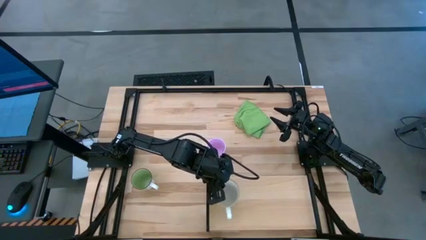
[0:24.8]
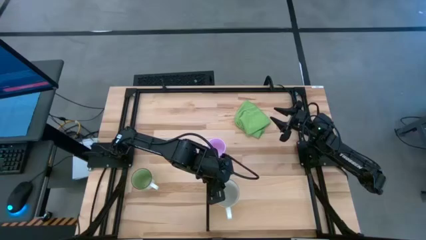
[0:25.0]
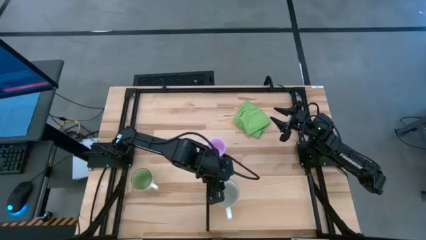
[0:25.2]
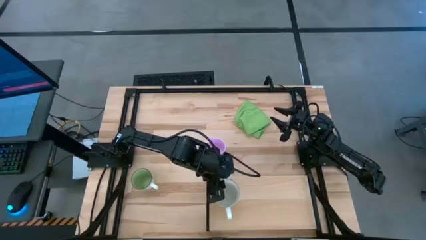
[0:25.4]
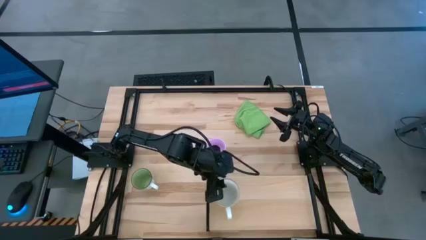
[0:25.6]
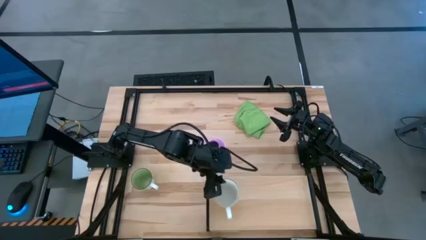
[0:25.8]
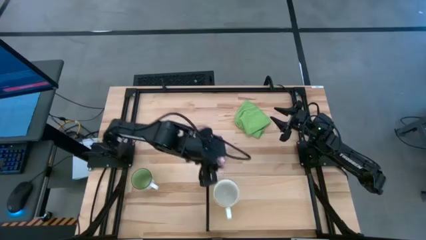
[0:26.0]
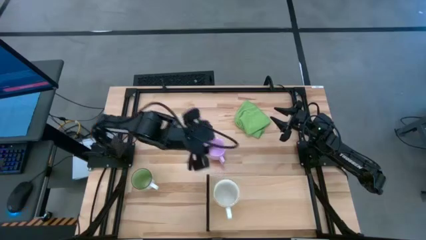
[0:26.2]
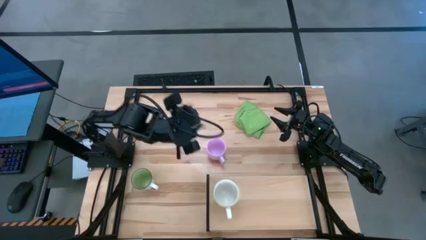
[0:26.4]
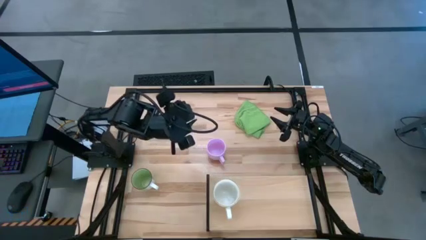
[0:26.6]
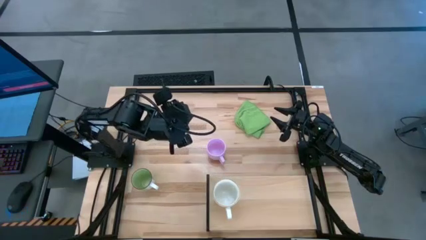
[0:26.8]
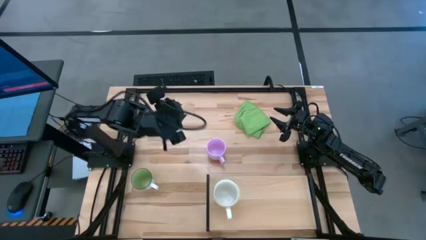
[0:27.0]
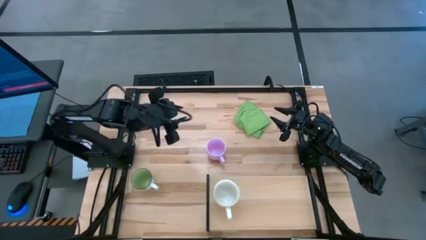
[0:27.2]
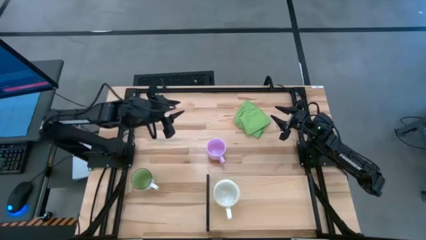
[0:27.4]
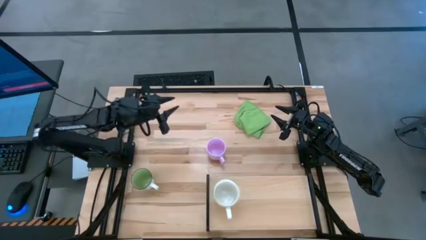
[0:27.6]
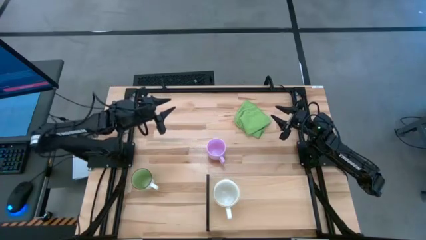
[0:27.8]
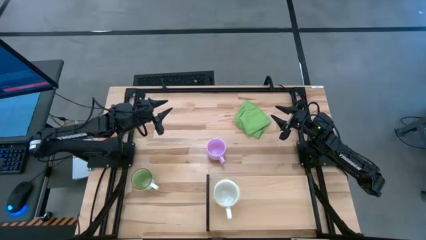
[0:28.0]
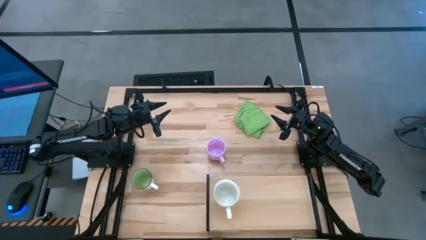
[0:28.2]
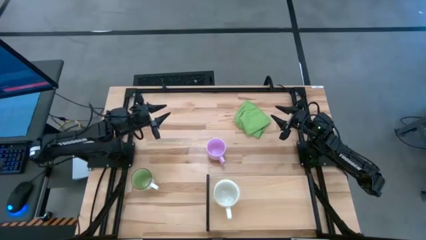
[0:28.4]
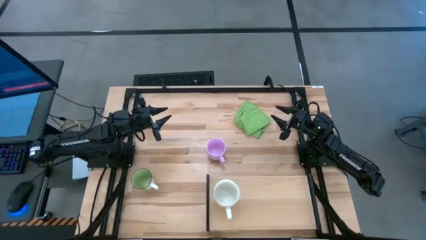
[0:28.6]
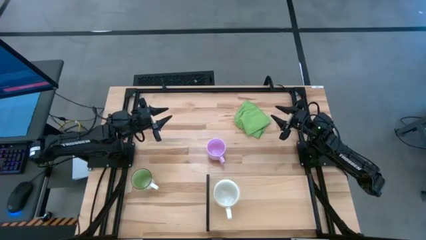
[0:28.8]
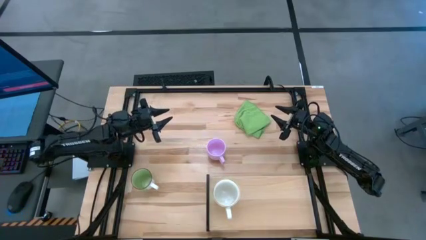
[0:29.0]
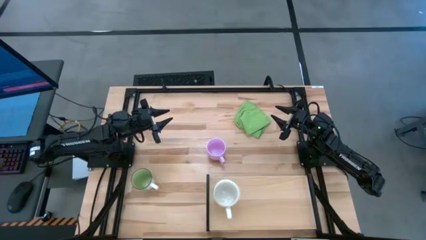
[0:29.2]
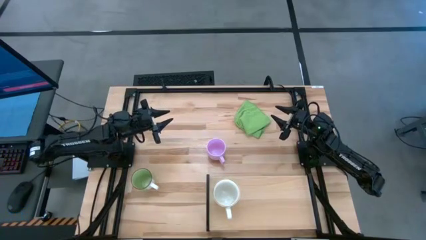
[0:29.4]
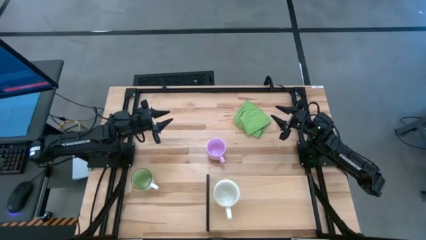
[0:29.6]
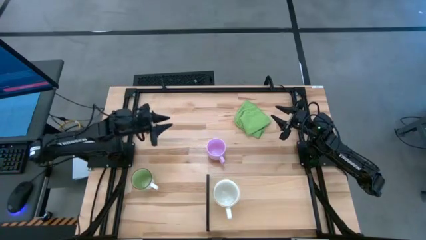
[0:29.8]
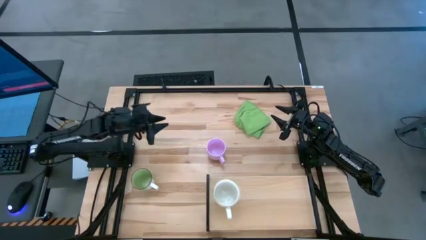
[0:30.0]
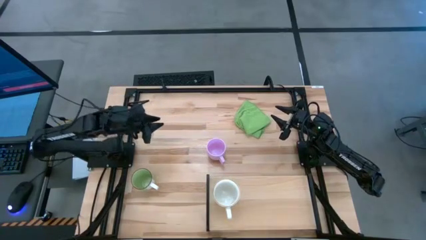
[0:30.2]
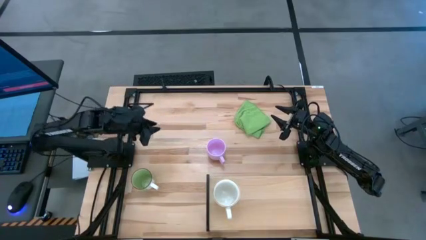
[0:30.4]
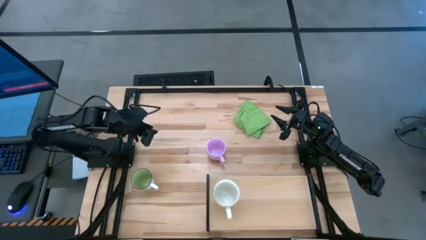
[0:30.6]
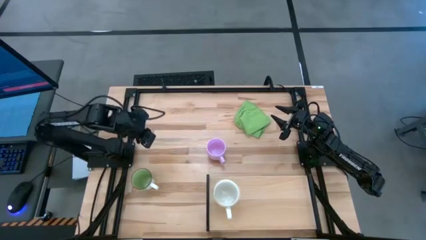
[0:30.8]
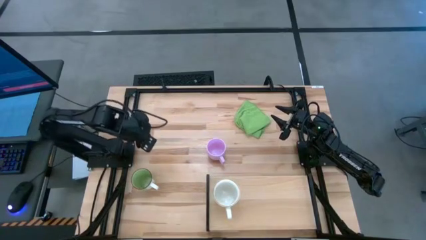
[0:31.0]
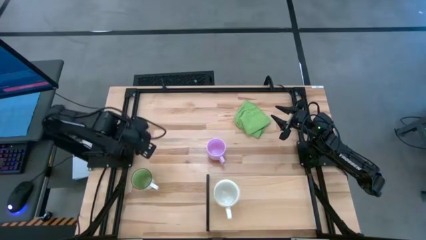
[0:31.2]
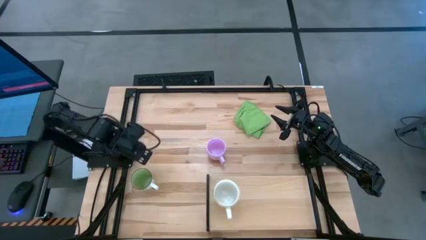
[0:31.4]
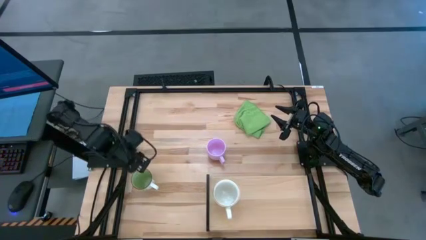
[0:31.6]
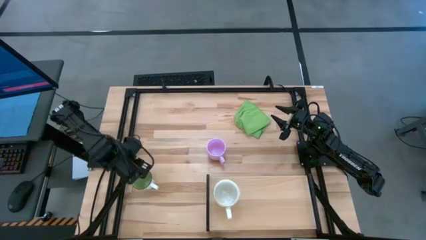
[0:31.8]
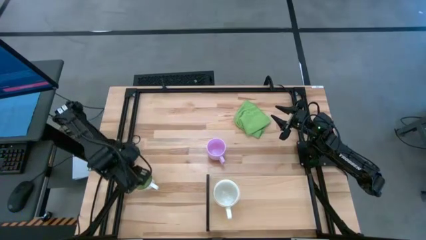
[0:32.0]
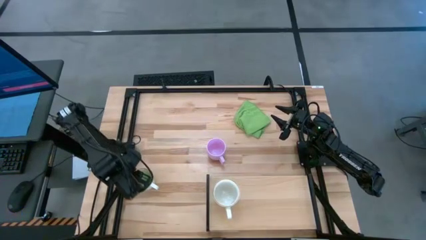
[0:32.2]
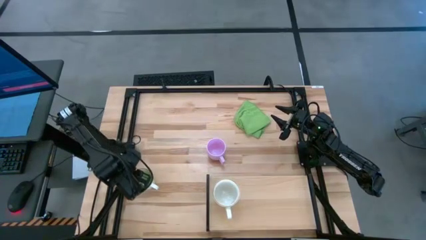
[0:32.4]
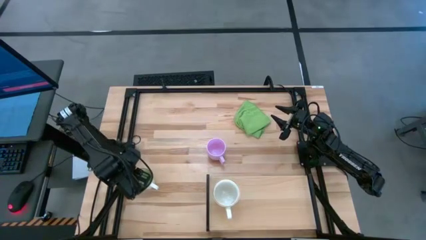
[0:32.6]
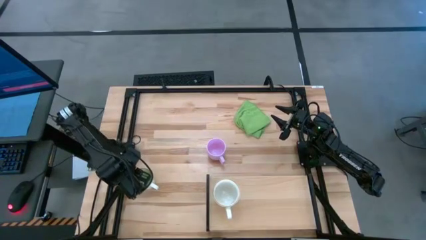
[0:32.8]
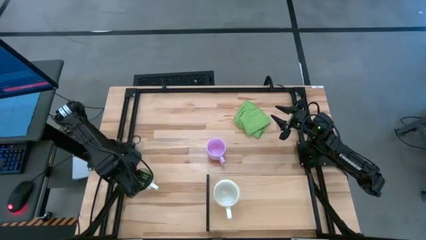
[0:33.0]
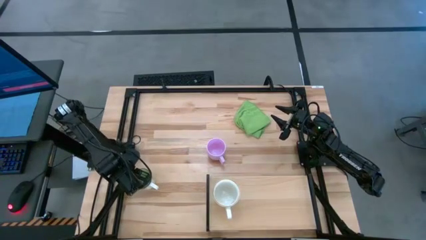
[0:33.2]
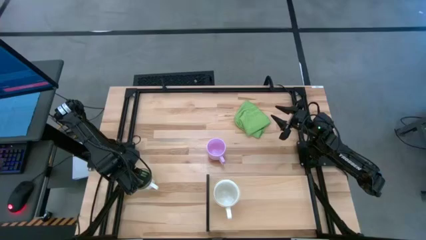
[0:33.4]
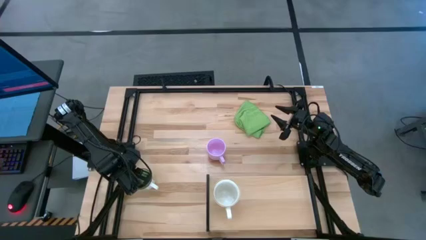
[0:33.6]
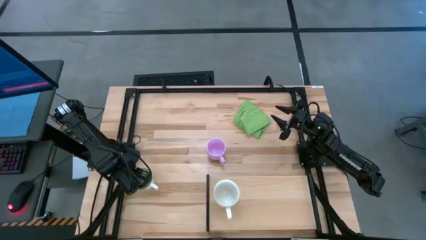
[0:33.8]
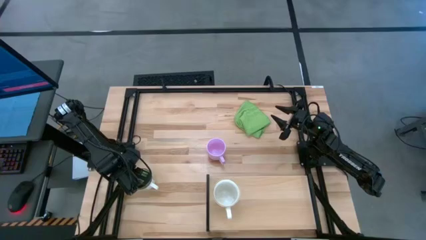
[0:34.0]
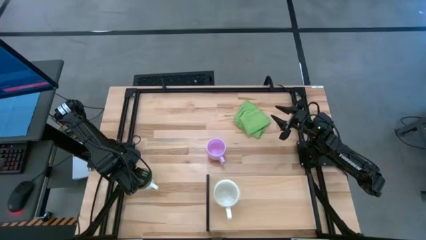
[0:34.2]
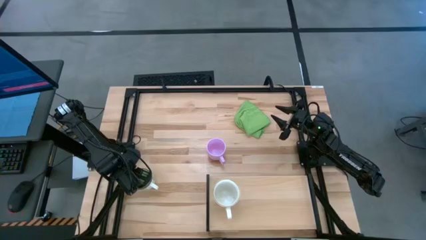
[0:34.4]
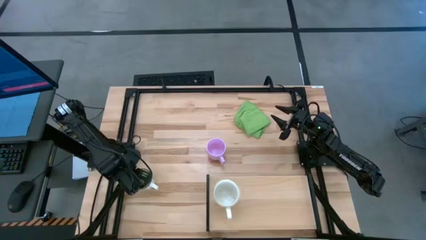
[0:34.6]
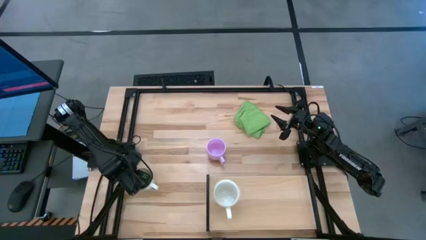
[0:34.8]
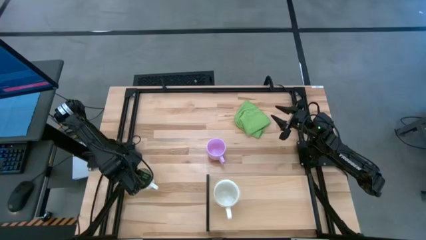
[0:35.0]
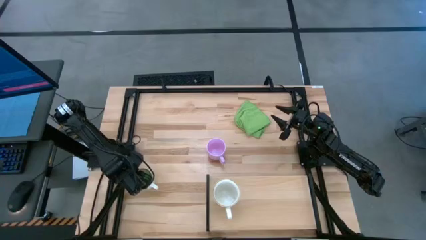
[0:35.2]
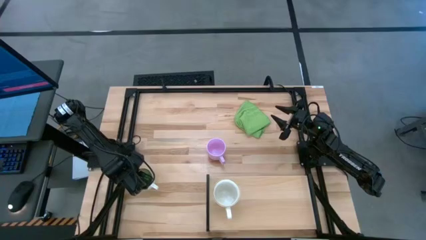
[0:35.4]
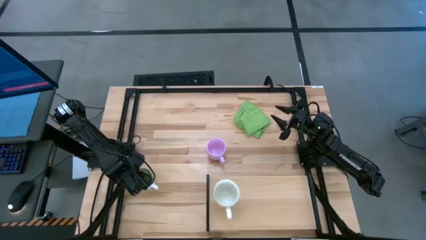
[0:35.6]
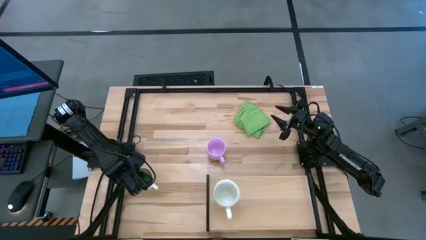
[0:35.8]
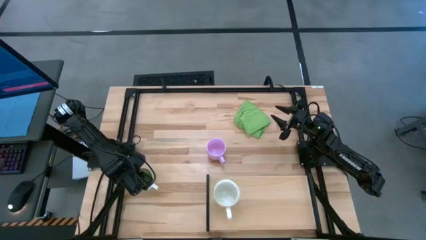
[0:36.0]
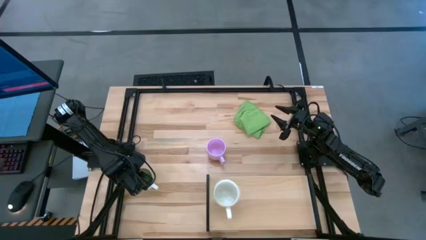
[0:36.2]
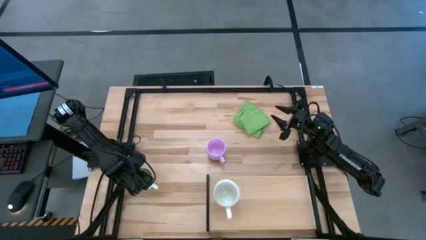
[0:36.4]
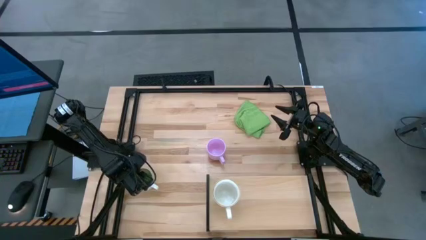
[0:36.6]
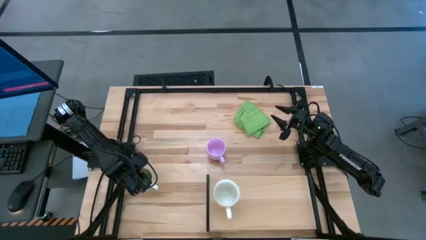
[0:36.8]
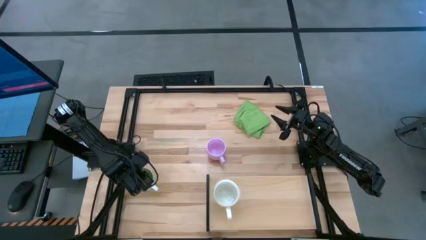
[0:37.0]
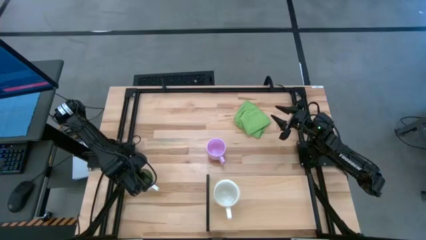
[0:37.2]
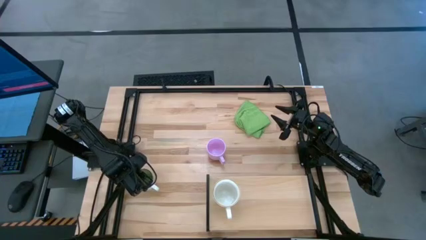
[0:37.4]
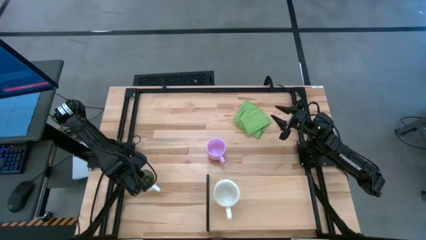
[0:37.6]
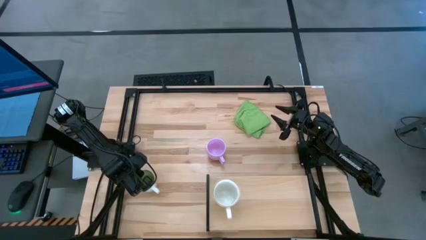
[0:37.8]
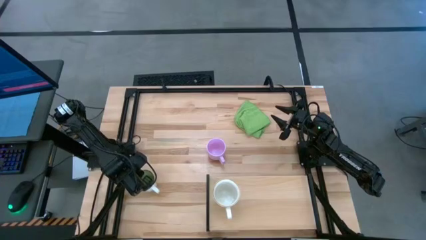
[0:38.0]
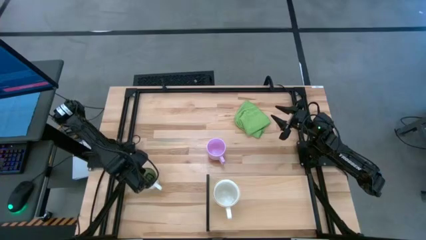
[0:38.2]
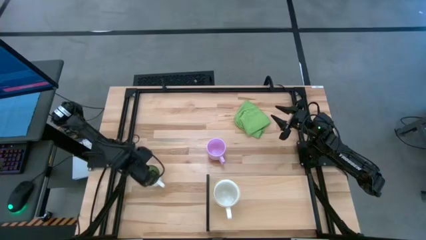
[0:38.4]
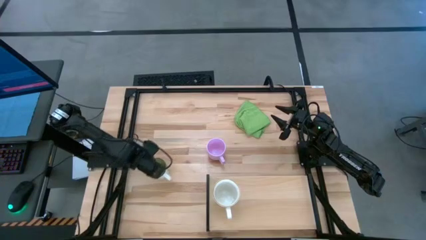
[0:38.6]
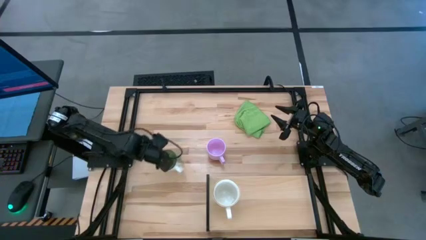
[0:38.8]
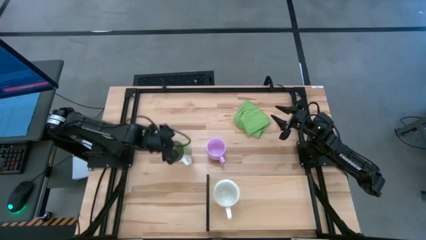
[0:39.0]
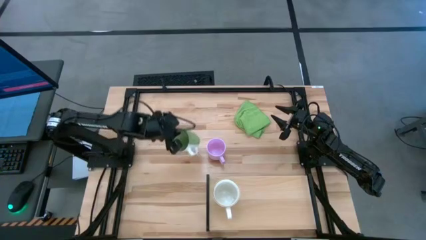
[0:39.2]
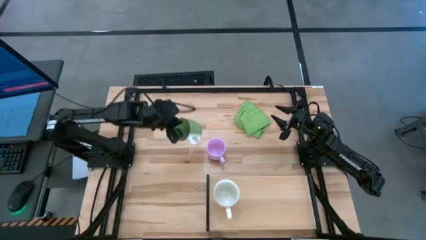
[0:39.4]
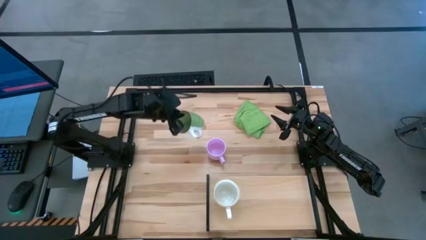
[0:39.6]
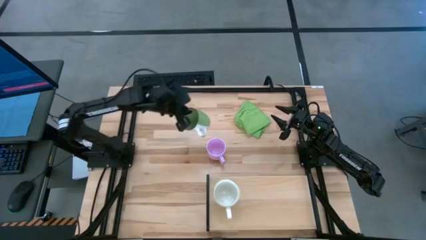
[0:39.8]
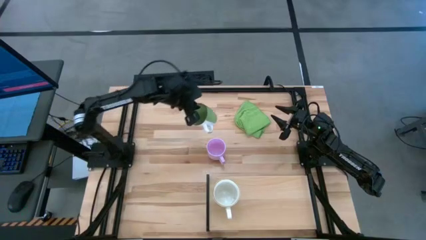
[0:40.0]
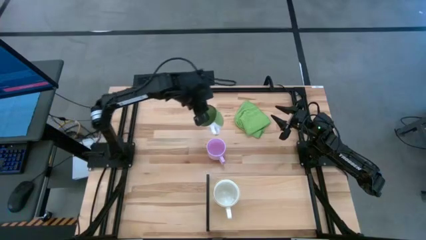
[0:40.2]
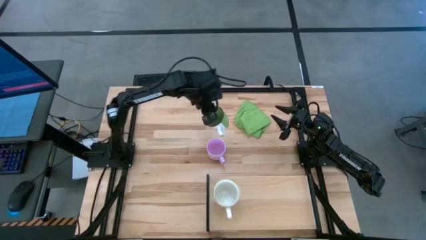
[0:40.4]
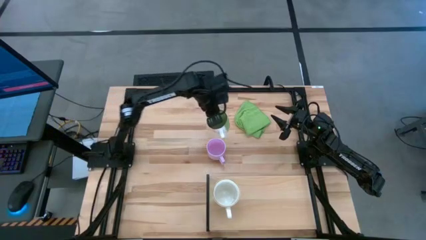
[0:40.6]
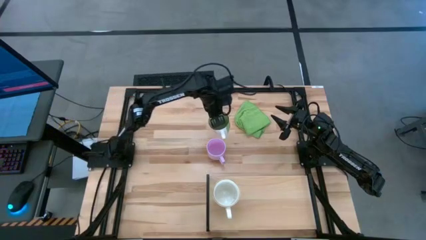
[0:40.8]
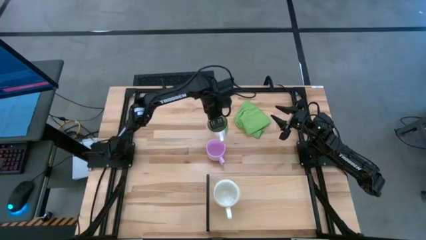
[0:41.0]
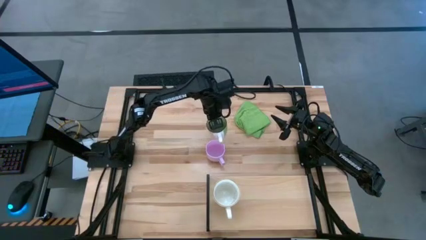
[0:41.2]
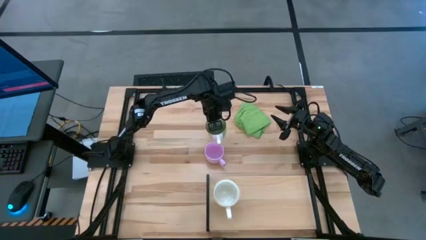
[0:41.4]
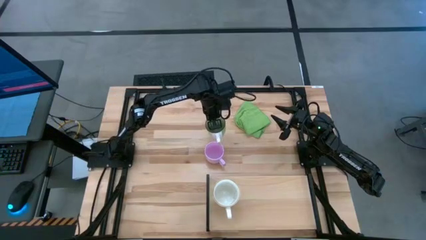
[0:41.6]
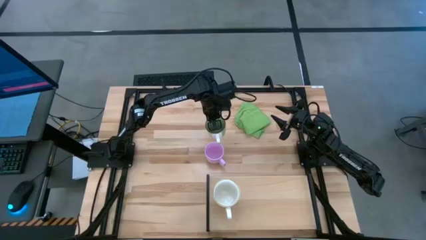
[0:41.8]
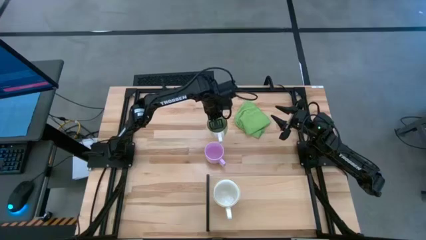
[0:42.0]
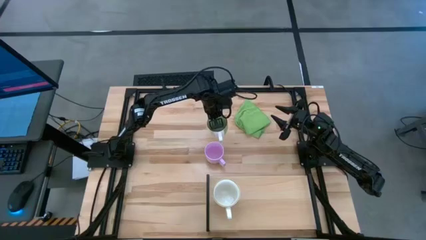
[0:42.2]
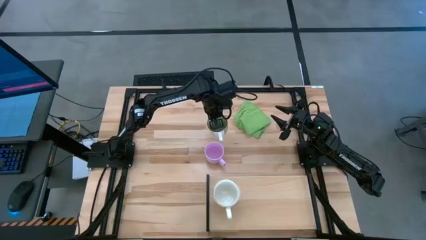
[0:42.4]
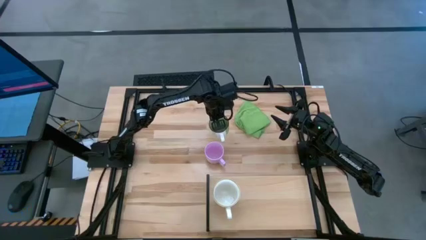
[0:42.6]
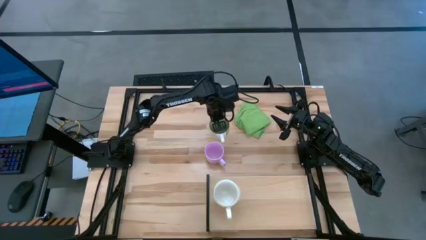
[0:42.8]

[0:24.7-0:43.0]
Task: Stack small to large cups/mugs on shelf
Put the green mug on the shelf
